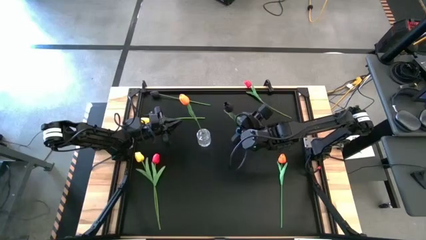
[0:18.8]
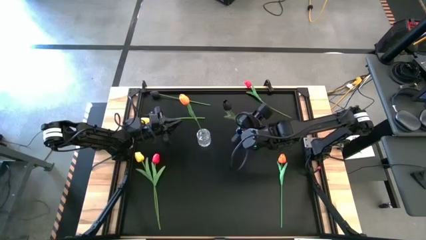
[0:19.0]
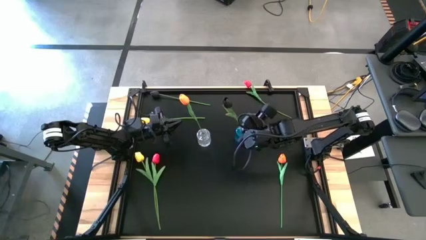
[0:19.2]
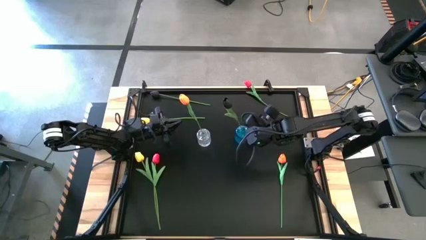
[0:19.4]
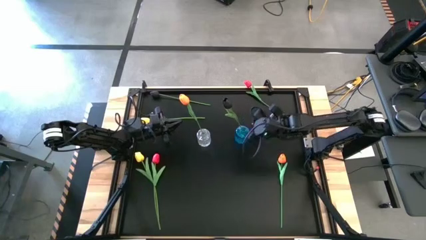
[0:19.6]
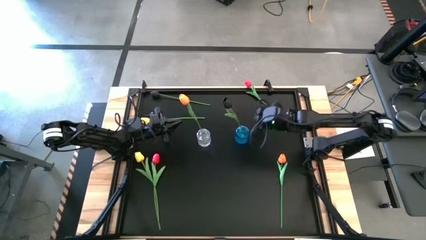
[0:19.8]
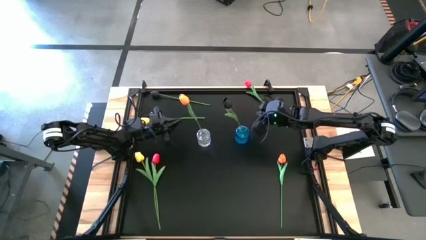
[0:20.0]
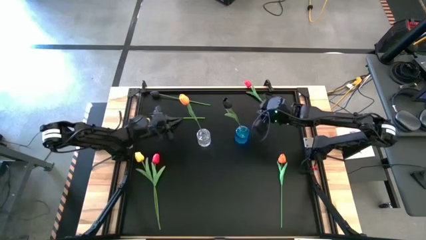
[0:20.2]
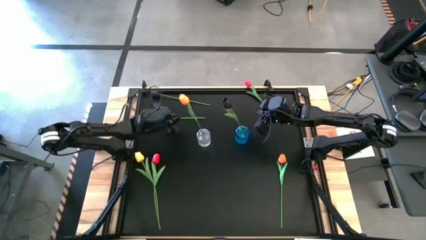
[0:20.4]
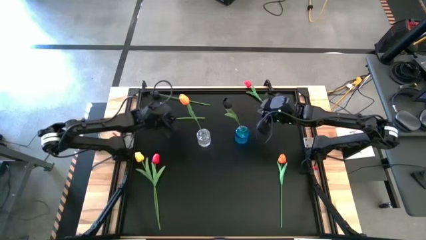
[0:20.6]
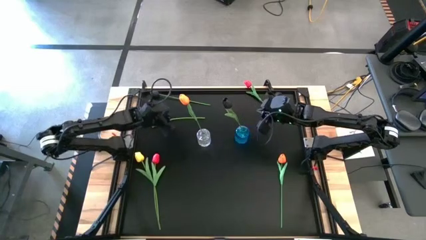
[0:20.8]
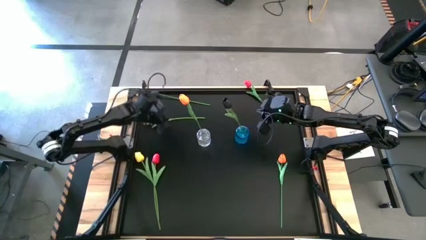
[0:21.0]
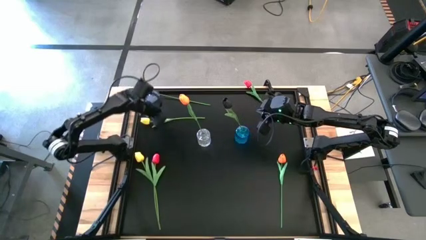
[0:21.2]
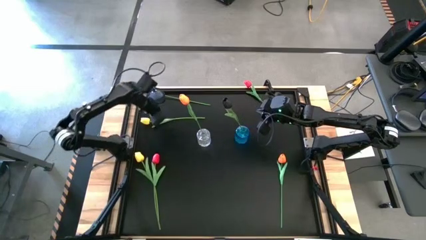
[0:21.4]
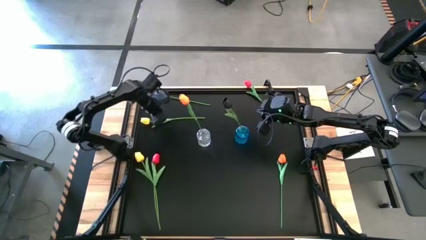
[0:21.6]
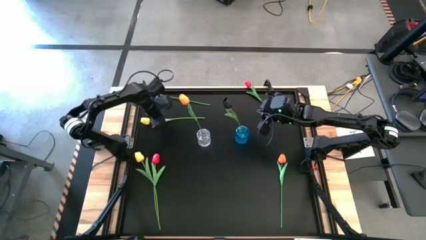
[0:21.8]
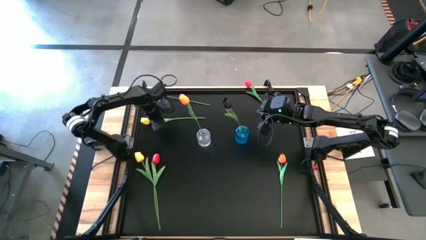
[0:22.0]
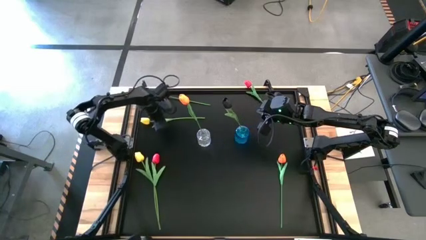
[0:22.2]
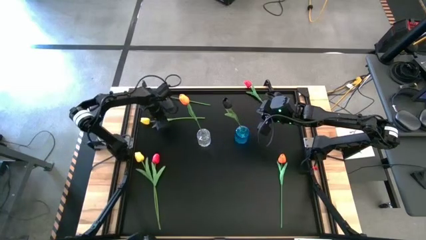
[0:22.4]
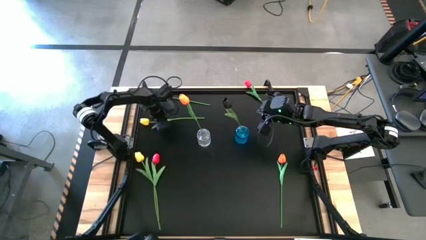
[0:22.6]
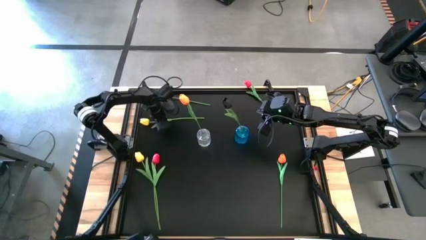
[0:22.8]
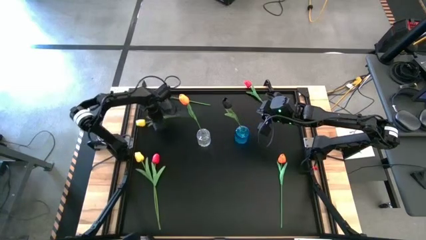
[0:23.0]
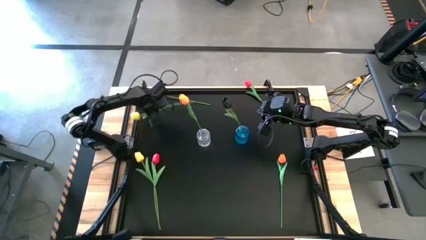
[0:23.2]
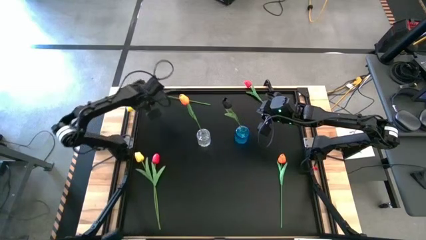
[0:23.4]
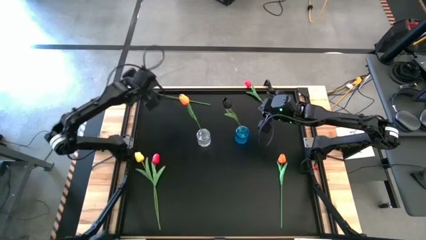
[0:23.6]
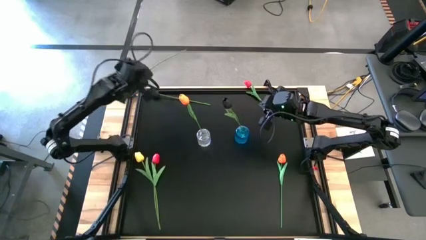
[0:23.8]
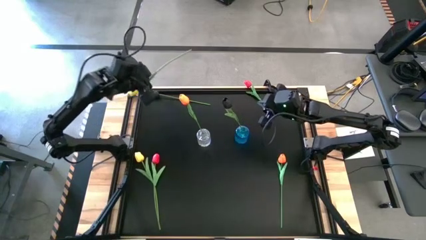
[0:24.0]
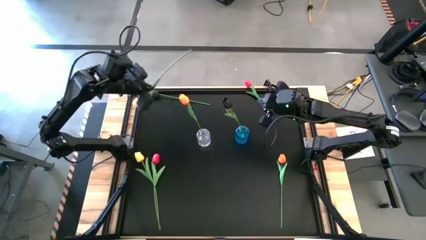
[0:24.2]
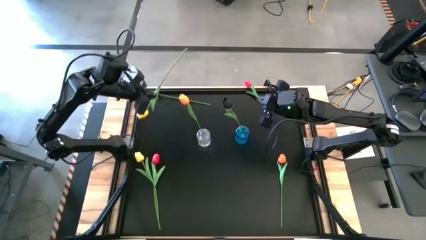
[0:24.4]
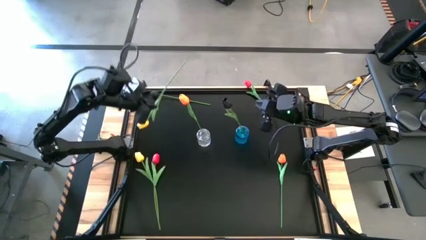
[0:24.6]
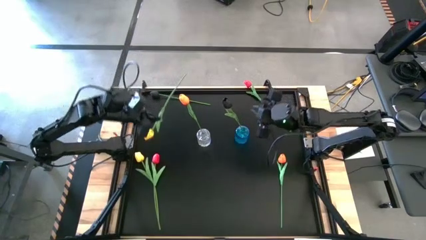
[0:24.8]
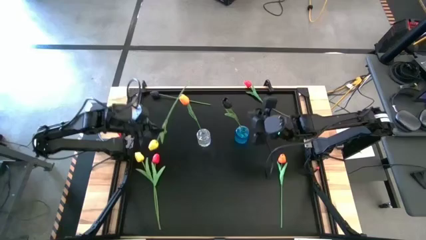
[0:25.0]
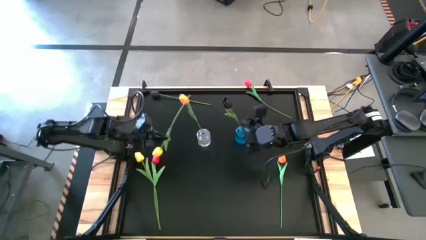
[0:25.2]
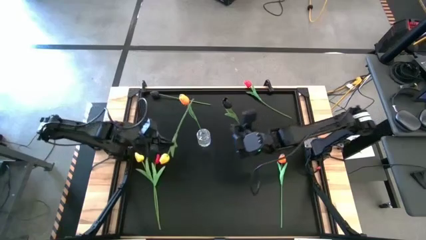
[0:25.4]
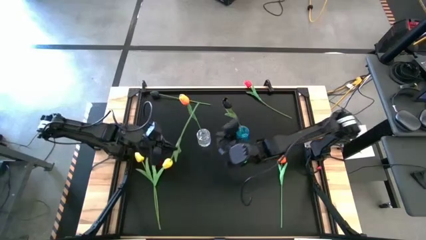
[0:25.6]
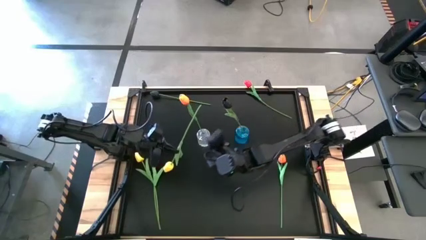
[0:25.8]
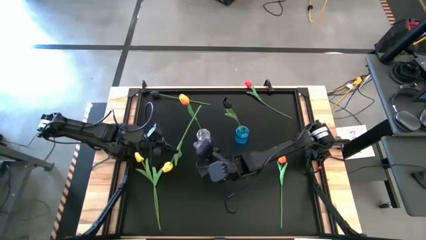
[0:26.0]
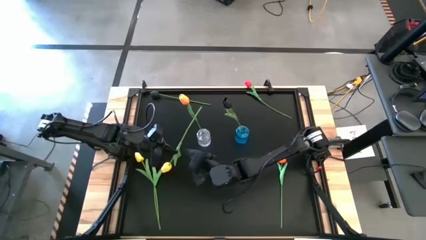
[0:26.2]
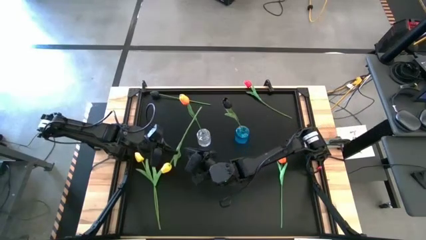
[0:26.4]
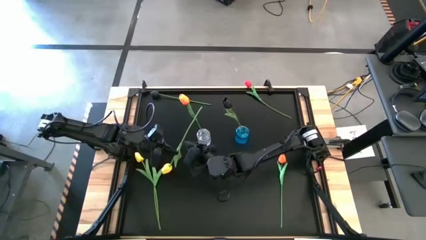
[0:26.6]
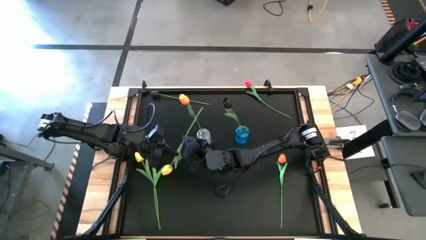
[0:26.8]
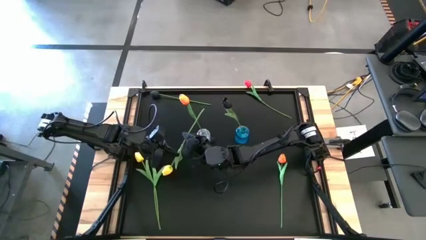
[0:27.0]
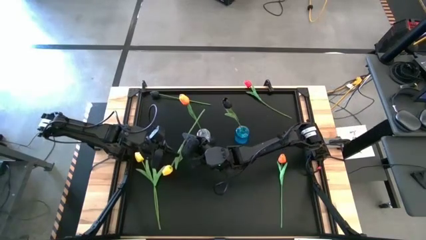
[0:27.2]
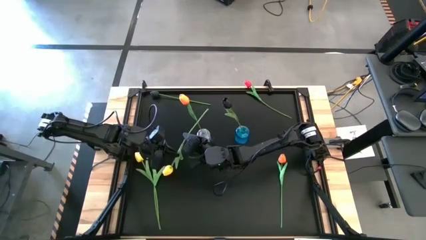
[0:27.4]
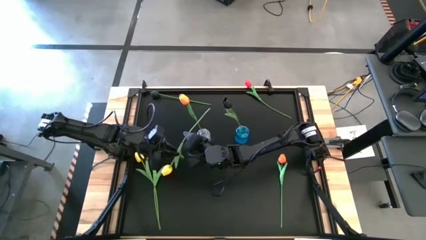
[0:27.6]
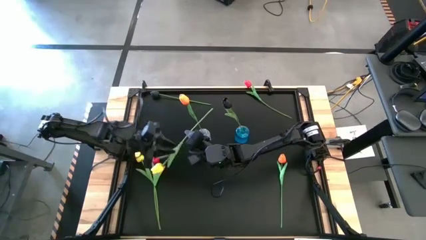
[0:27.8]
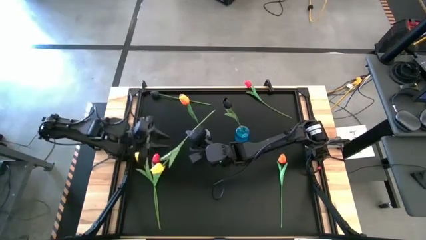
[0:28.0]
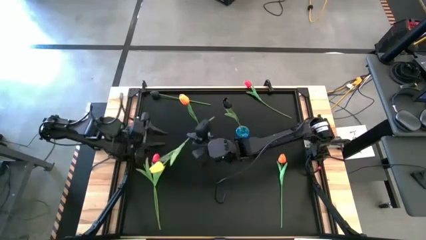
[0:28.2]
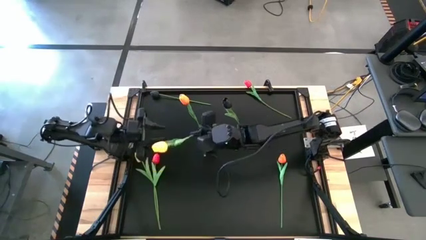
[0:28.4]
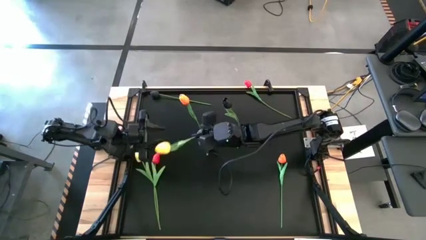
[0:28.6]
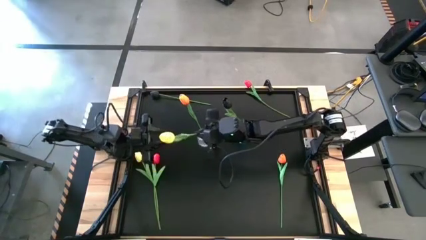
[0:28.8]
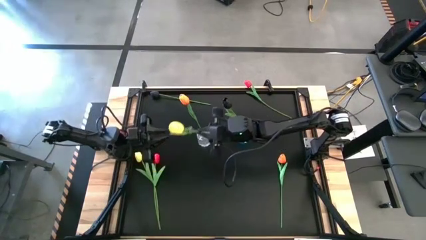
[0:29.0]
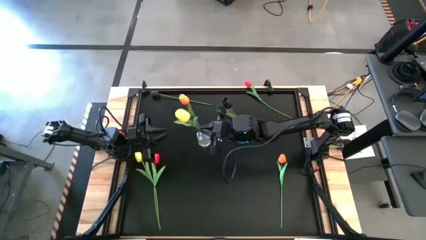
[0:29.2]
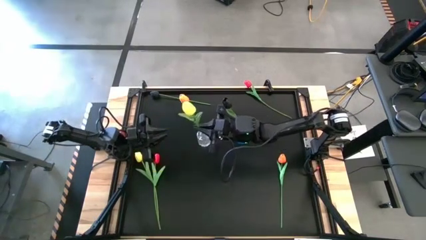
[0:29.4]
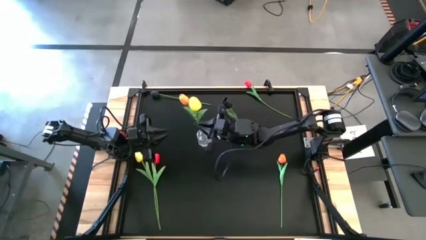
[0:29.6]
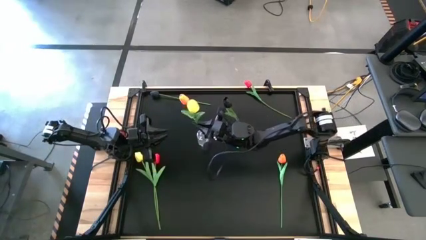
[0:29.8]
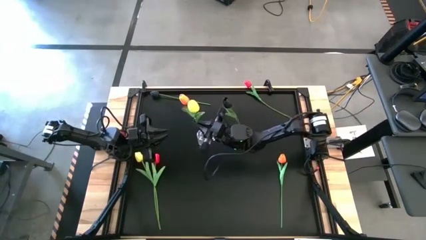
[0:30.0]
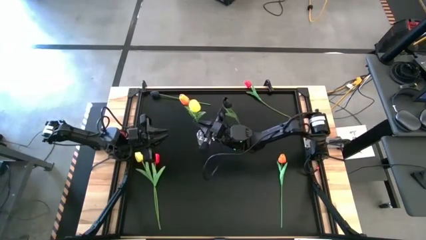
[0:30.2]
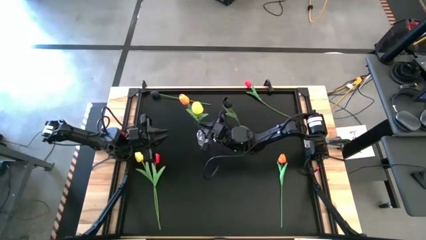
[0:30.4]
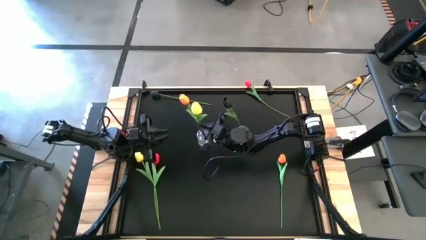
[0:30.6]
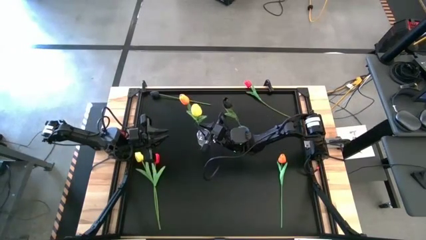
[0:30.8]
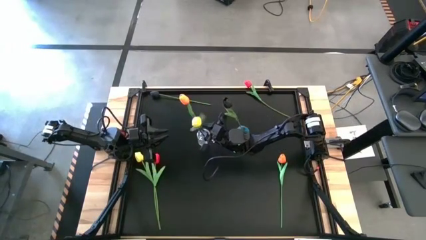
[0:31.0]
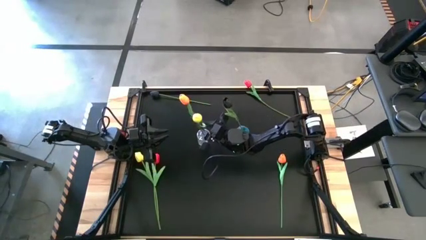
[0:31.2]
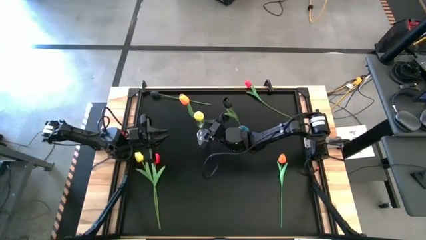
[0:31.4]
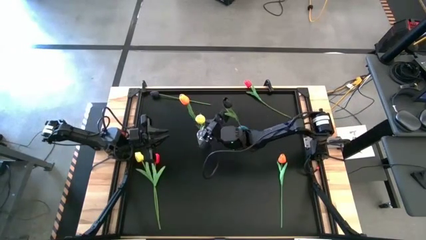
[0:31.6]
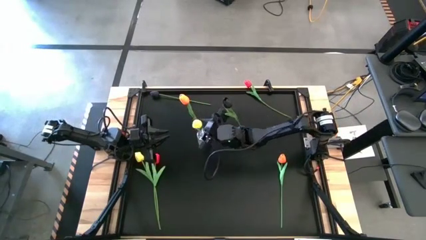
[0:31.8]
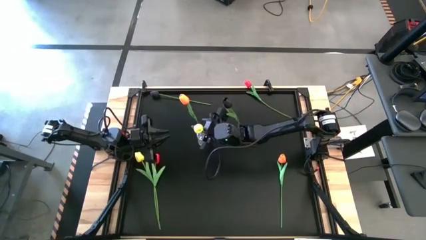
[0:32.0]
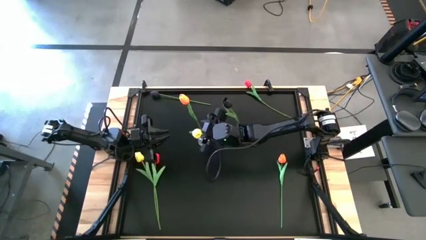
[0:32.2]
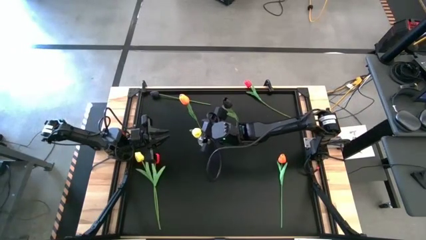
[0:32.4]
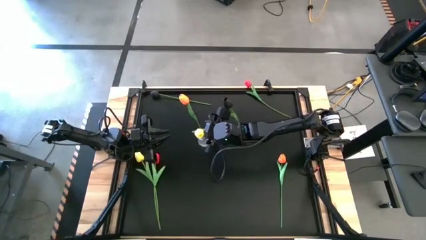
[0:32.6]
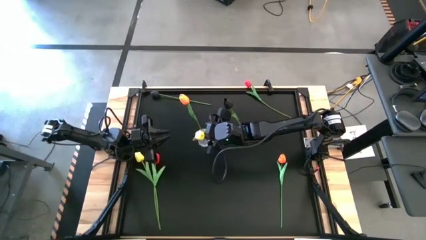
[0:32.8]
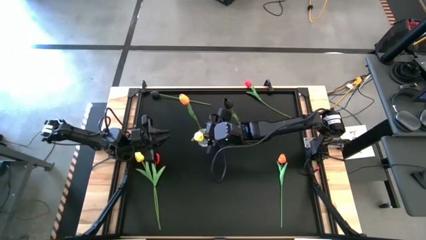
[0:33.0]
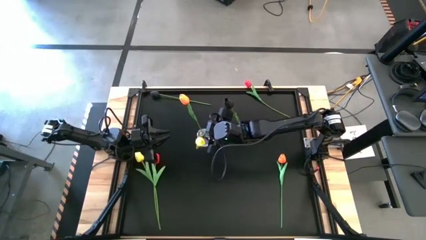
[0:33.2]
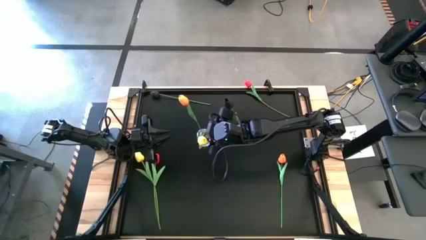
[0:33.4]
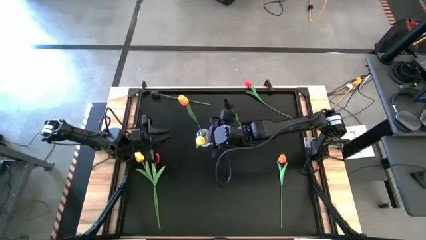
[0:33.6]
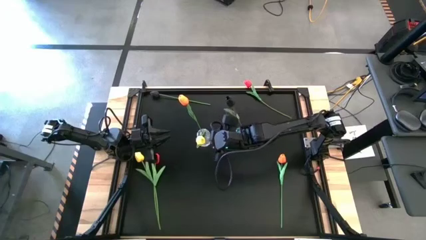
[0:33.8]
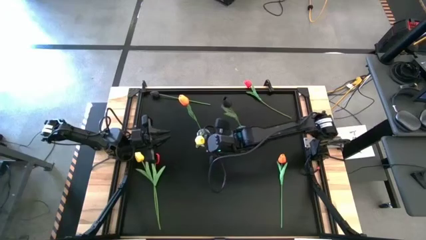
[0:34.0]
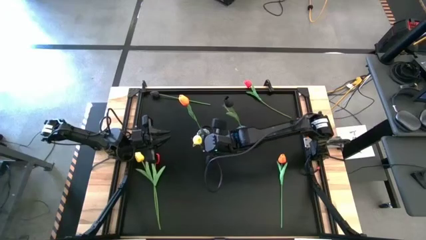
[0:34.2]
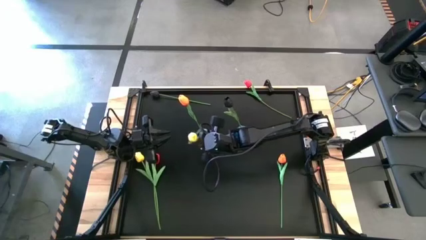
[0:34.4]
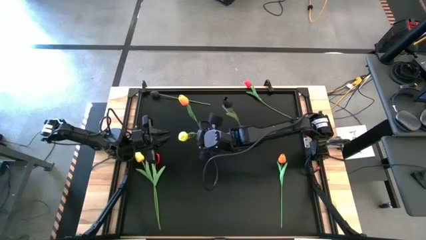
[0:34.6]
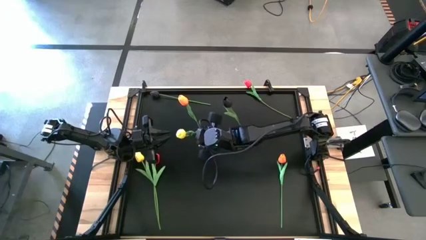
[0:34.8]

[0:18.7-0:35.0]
Task: Sort flowers into vase by color
Put the top yellow flower into the transparent vase
